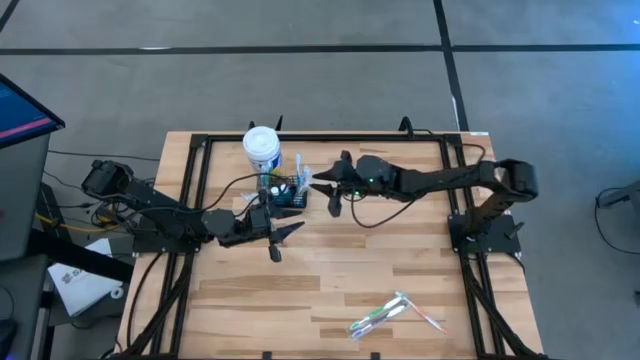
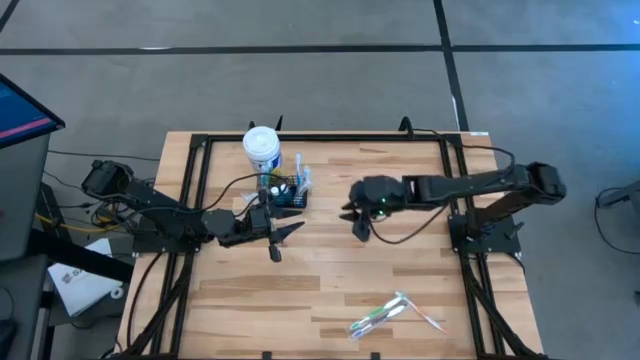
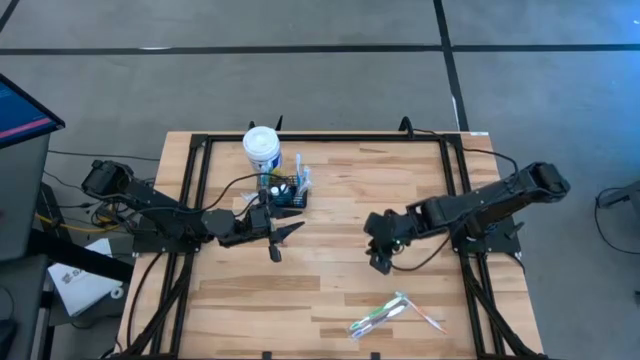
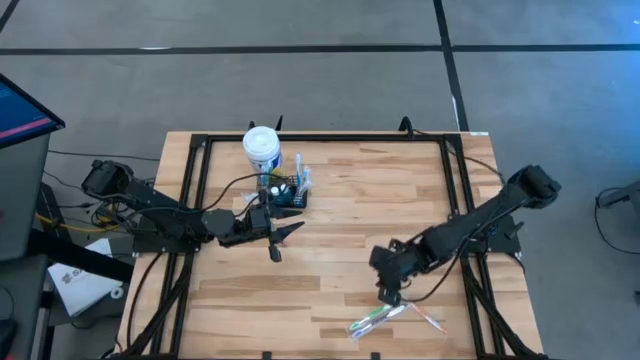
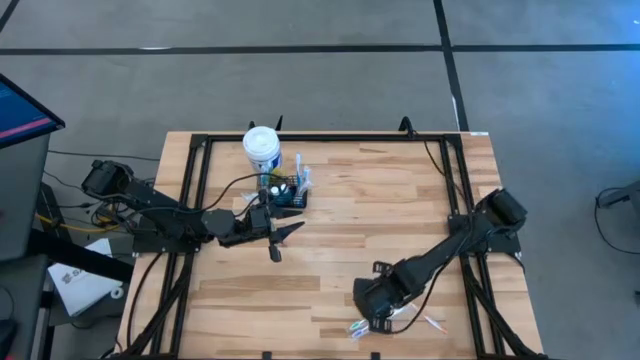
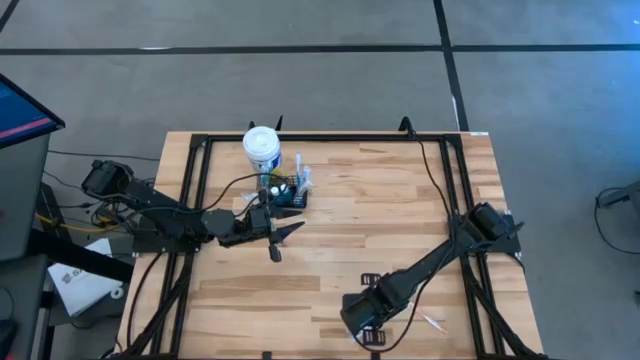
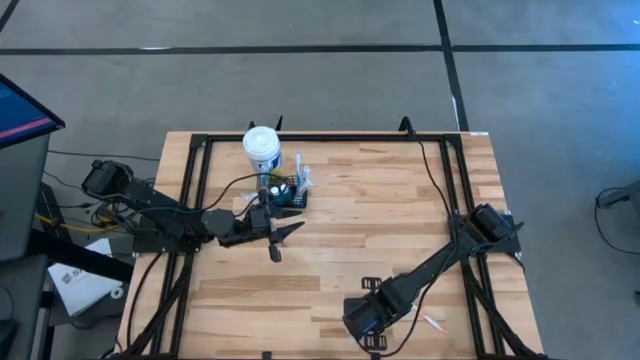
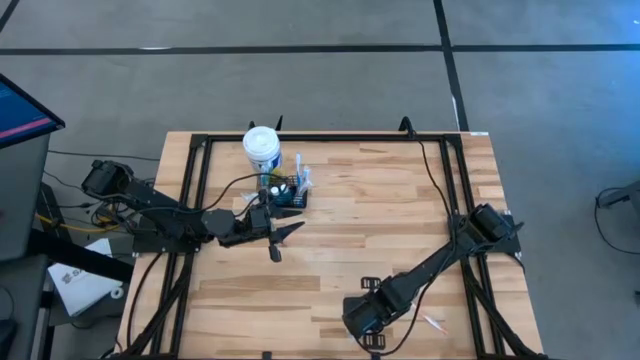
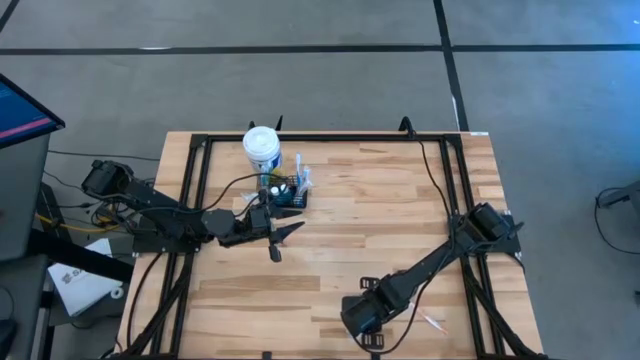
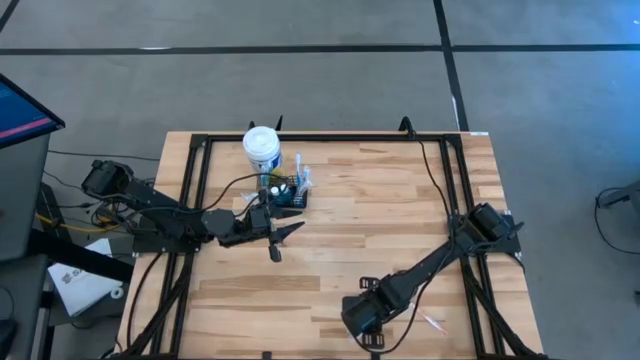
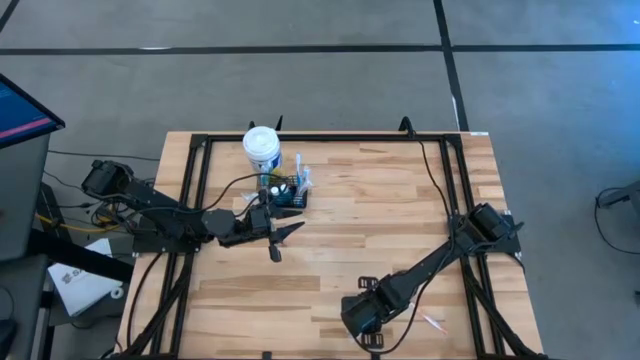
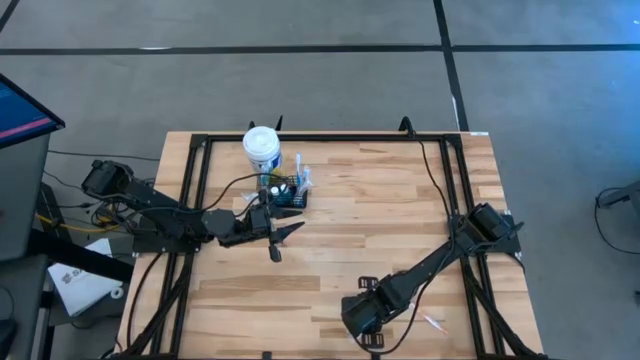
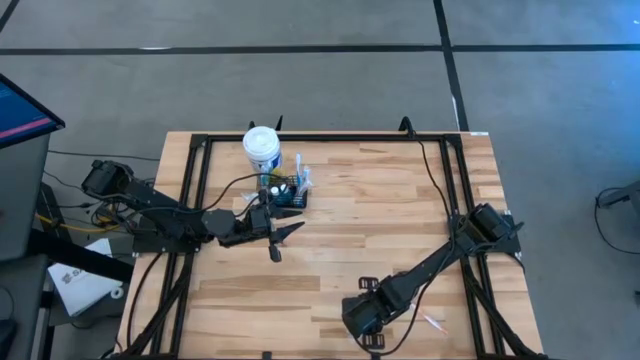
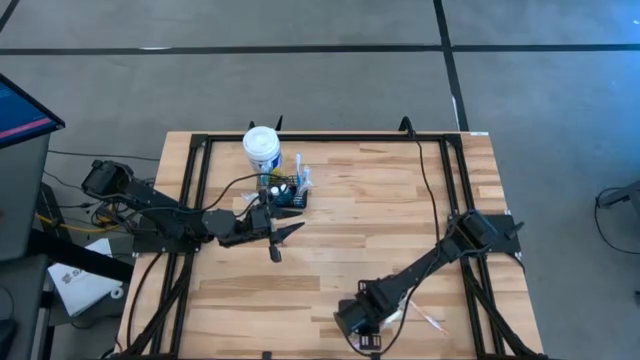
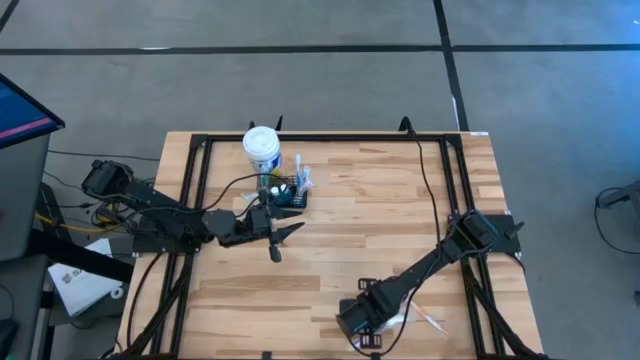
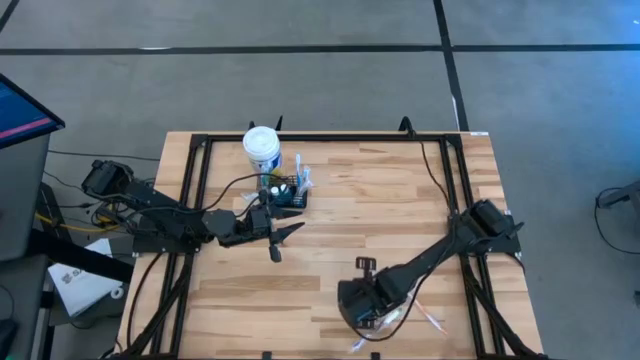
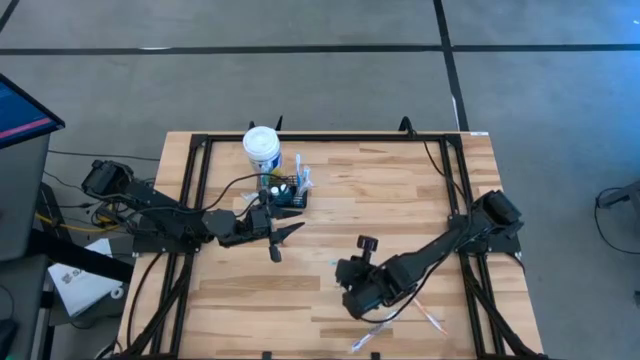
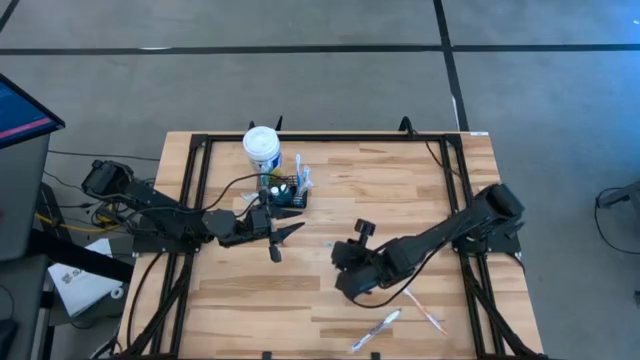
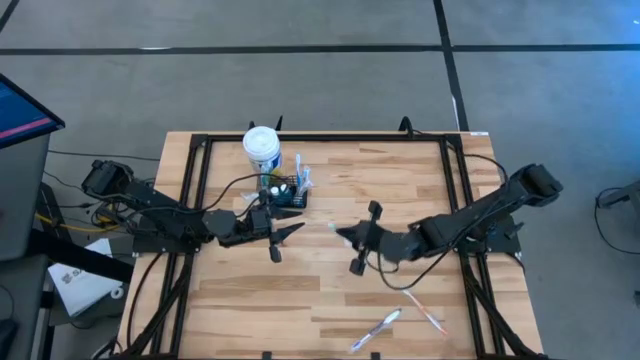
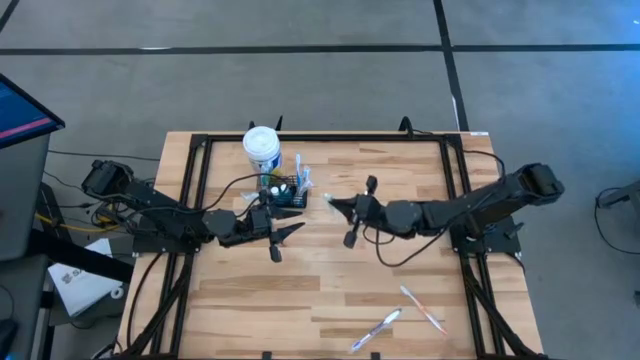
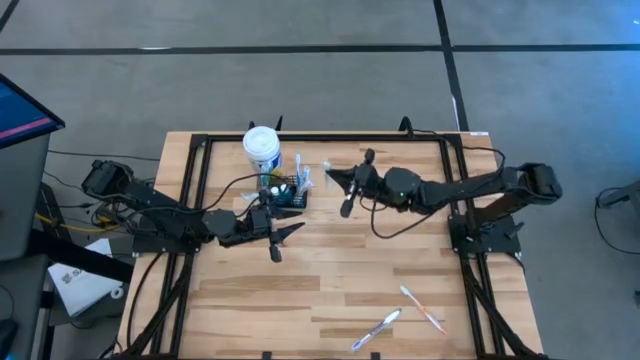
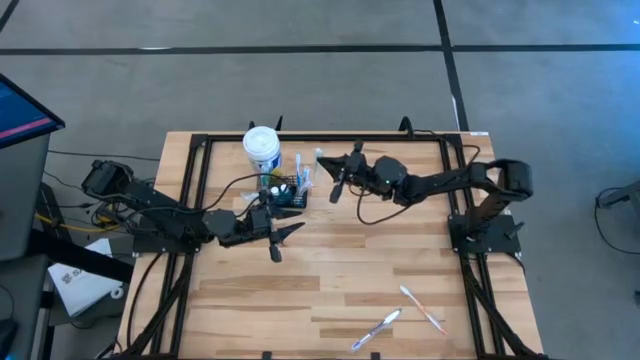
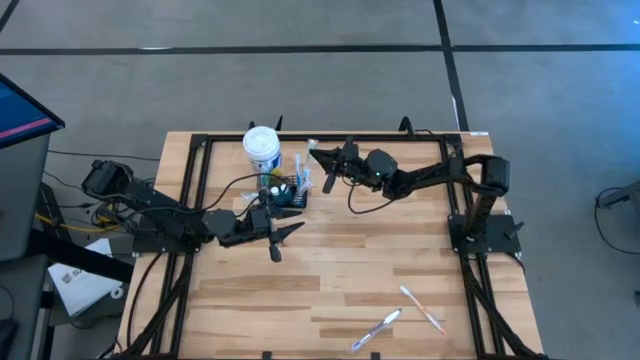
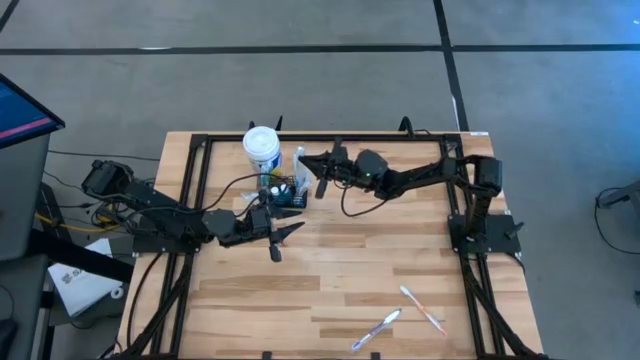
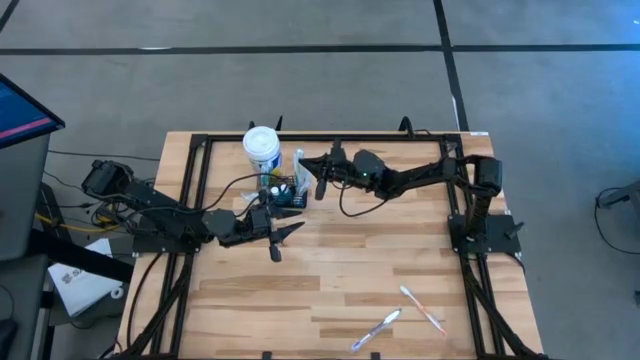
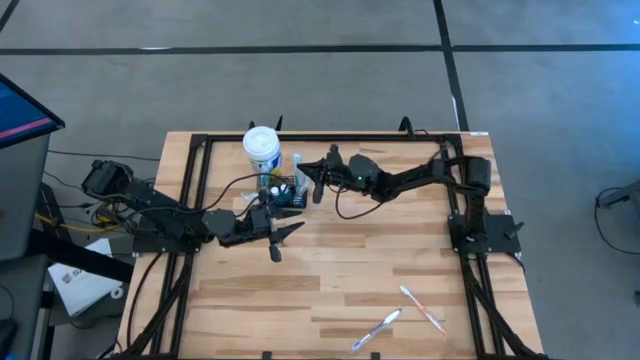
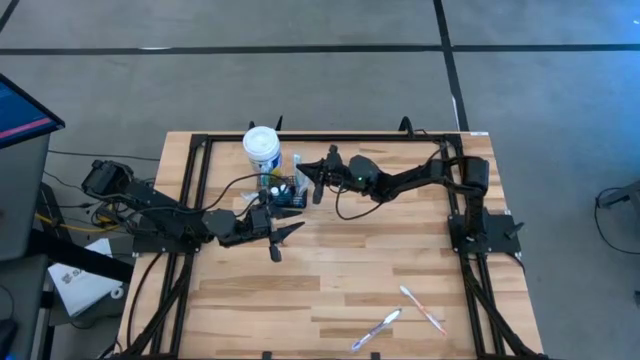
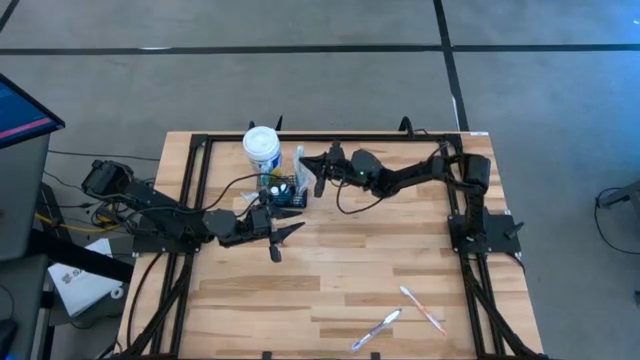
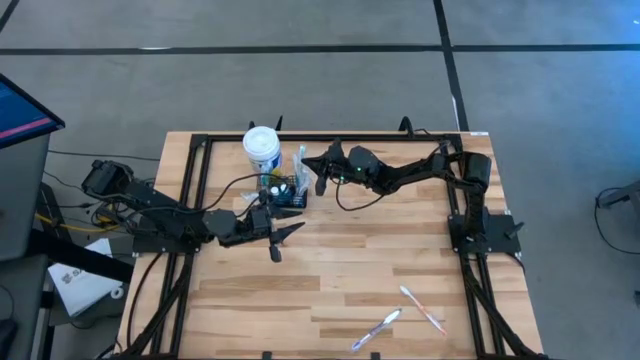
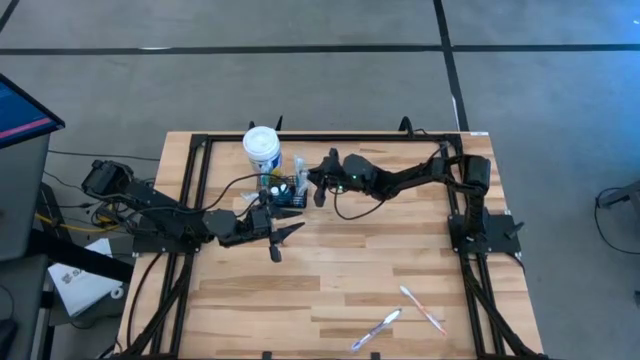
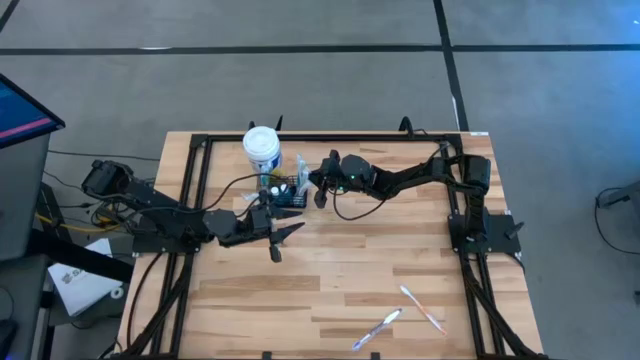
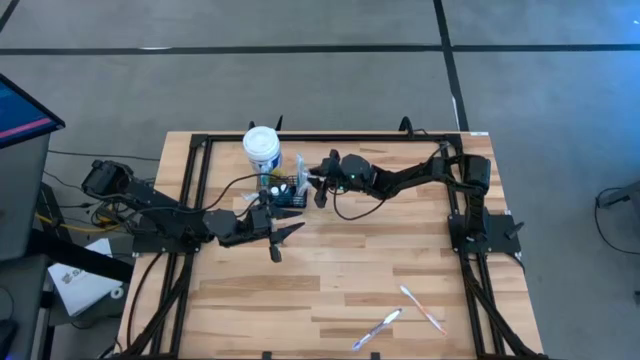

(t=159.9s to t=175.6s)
Task: Pick & Place toothbrushing station
Put the green toothbrush into the wire organizer

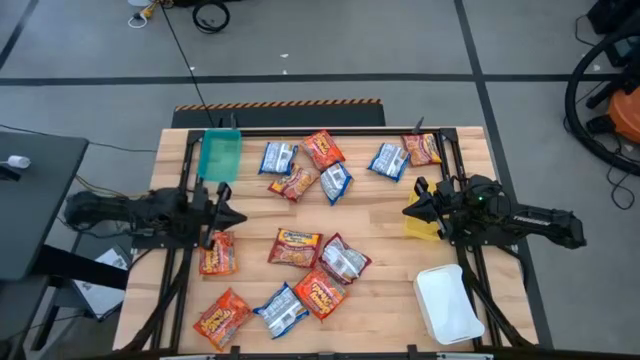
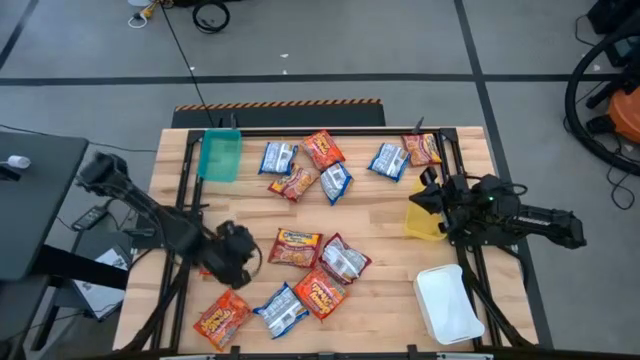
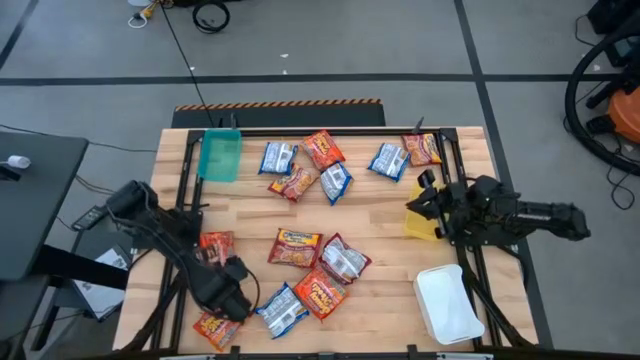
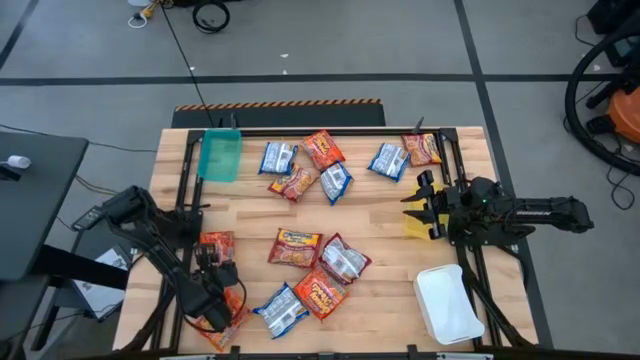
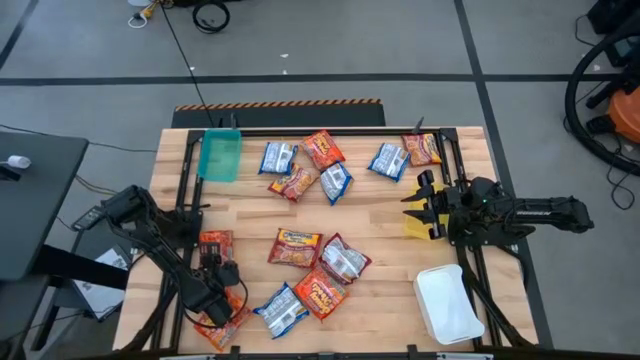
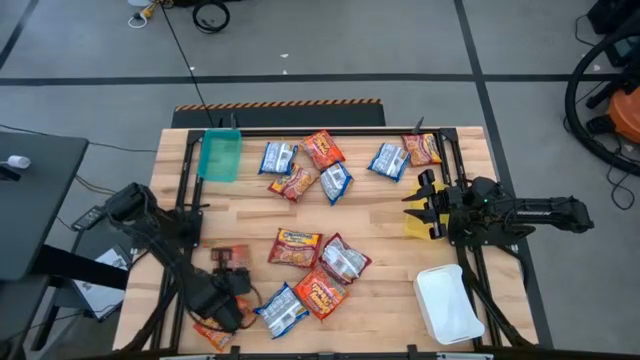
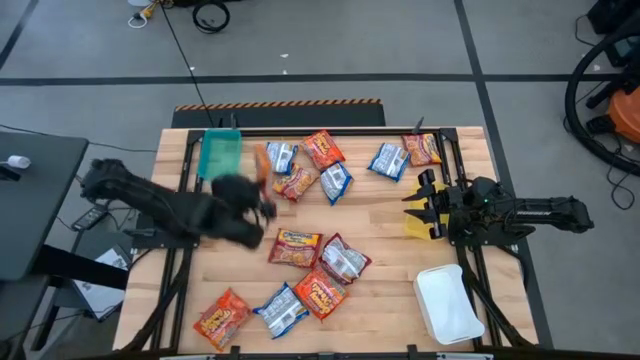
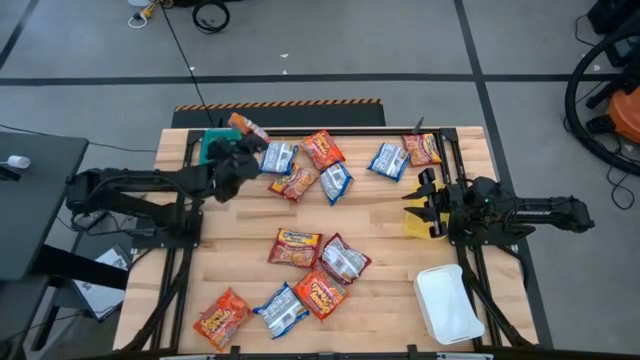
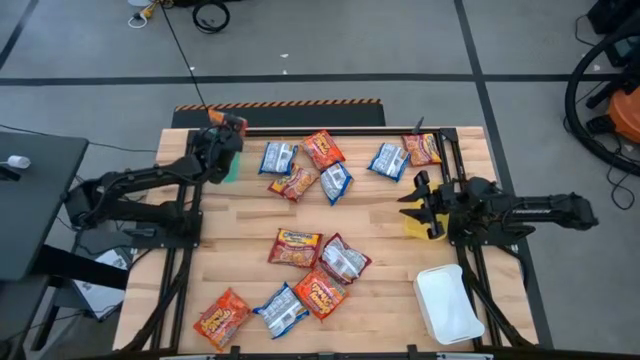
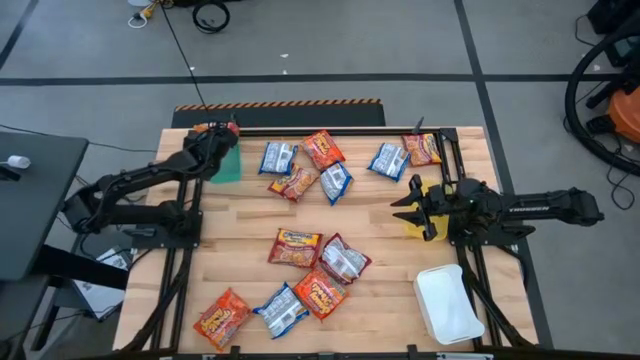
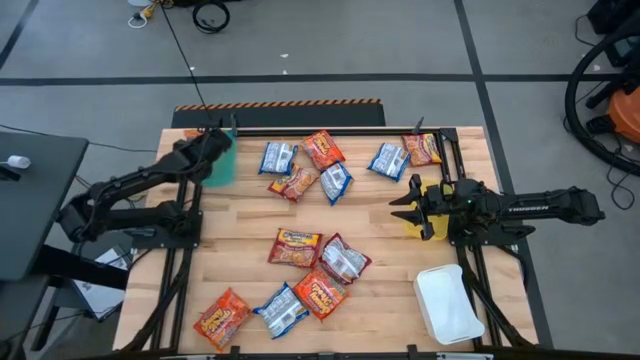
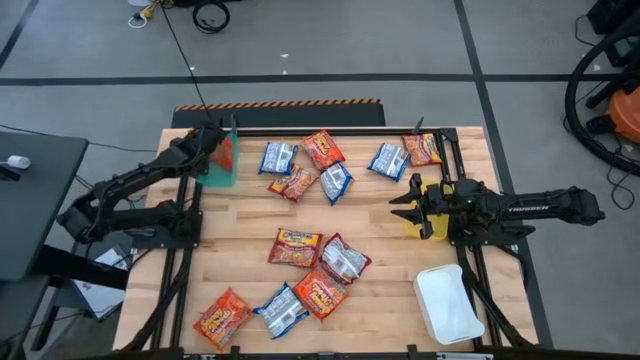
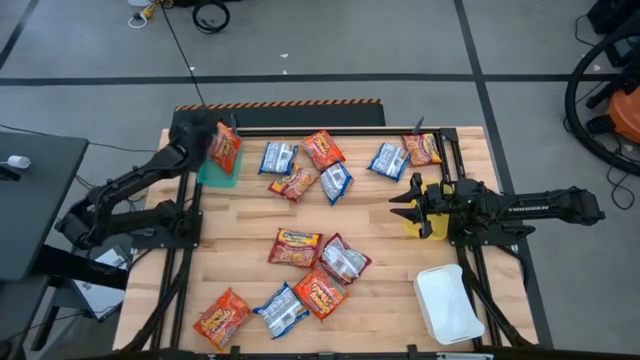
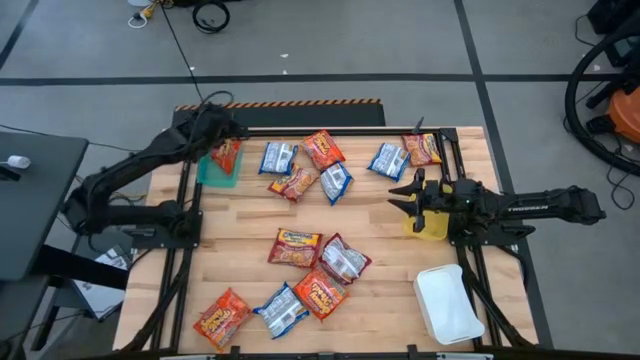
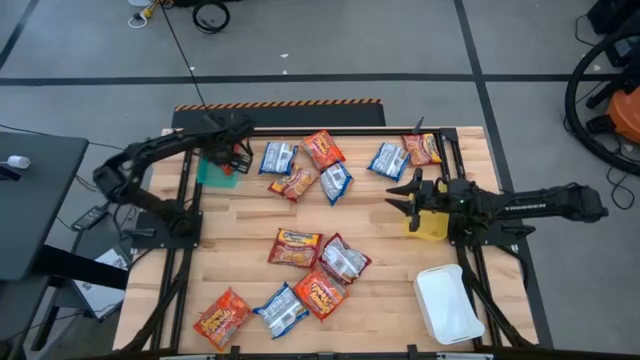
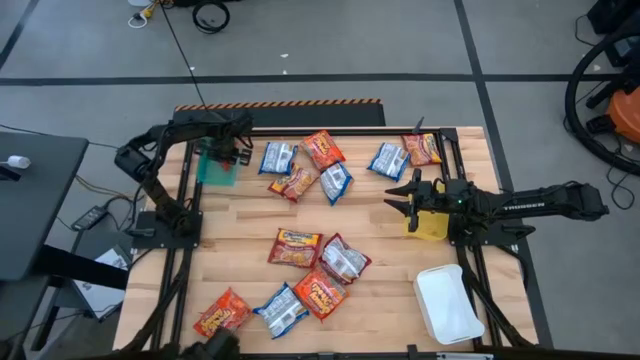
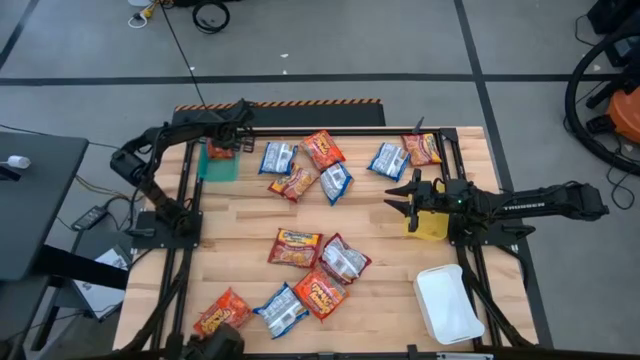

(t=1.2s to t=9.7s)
Task: Sort Maruchan noodles
Put the orange noodle pack into the green bin
